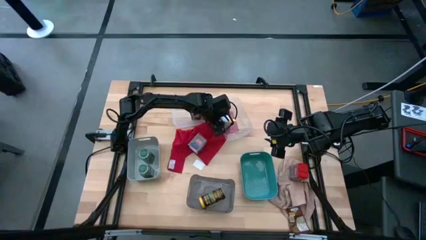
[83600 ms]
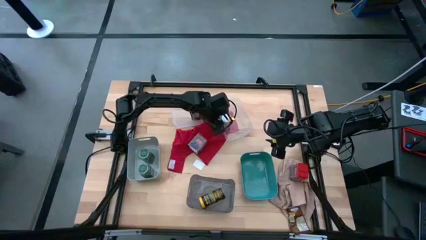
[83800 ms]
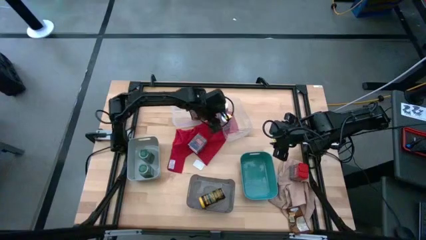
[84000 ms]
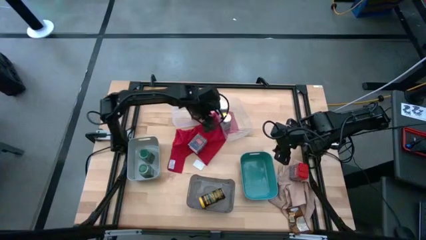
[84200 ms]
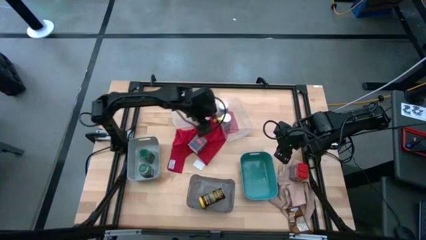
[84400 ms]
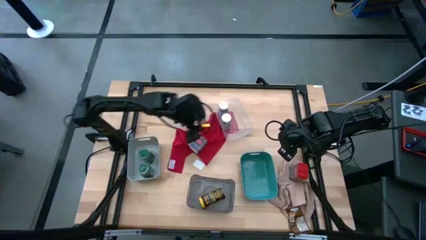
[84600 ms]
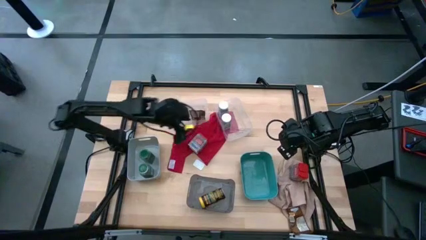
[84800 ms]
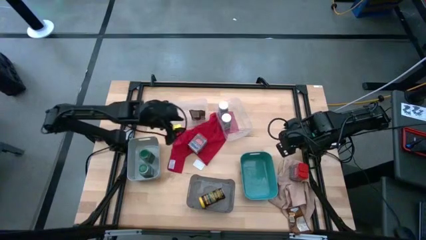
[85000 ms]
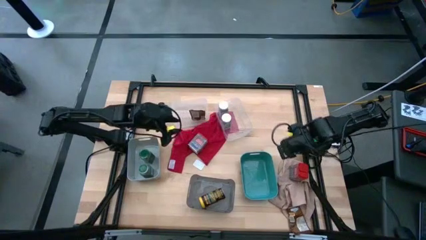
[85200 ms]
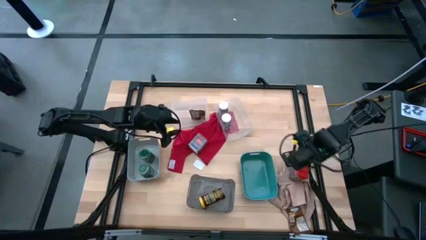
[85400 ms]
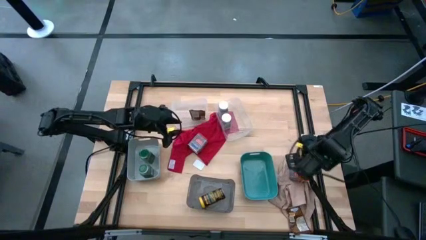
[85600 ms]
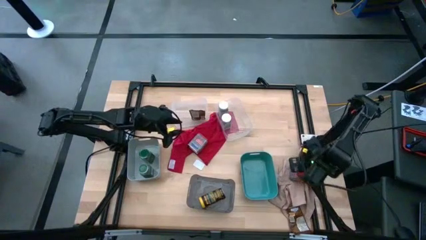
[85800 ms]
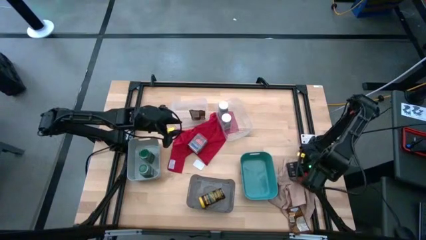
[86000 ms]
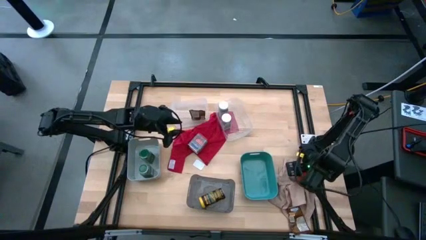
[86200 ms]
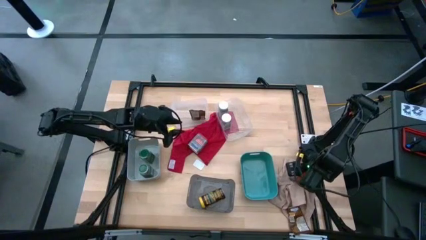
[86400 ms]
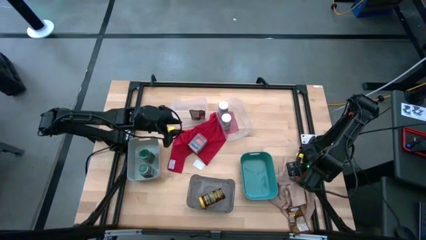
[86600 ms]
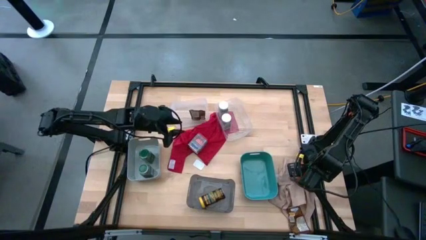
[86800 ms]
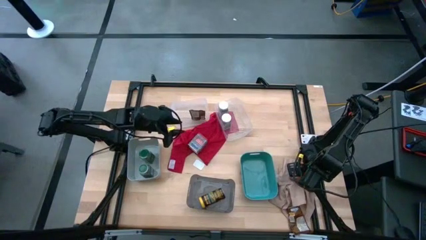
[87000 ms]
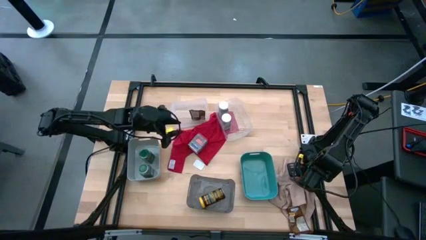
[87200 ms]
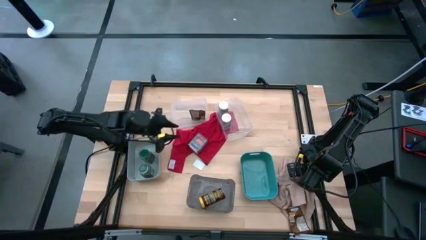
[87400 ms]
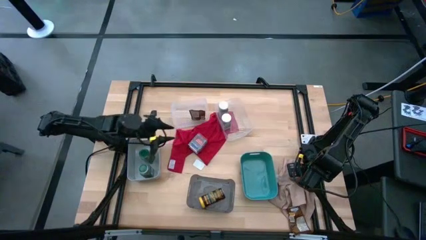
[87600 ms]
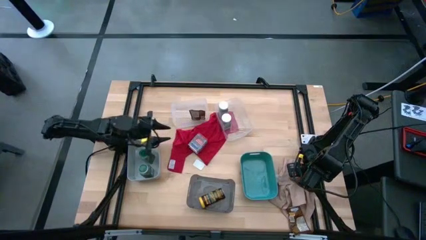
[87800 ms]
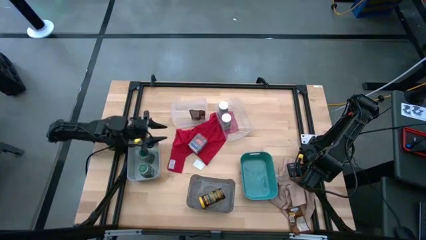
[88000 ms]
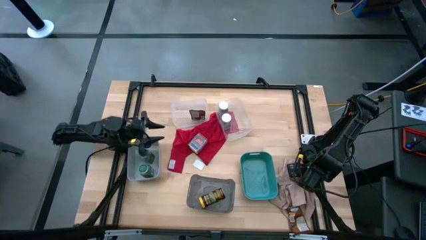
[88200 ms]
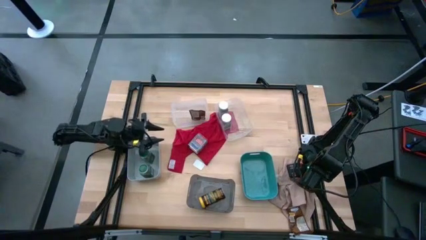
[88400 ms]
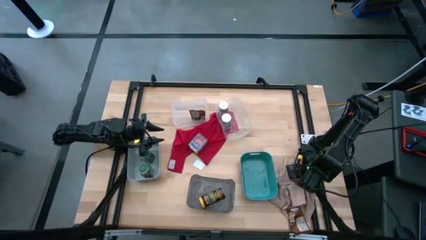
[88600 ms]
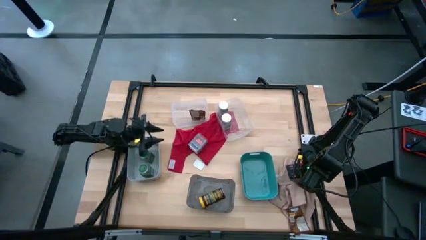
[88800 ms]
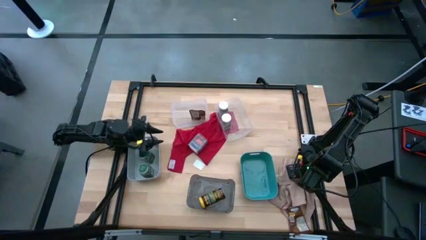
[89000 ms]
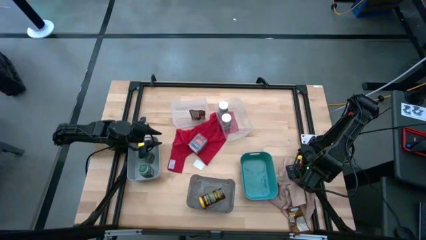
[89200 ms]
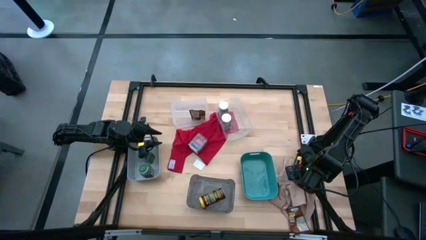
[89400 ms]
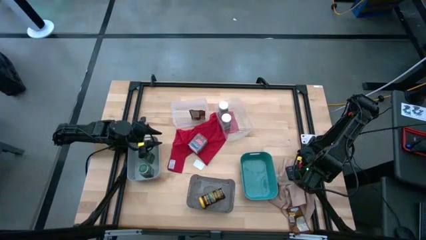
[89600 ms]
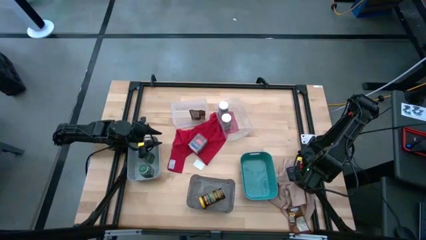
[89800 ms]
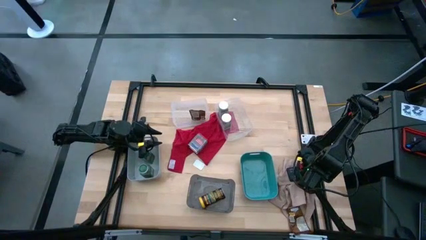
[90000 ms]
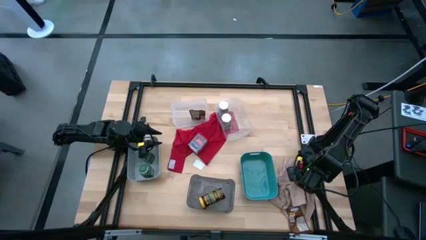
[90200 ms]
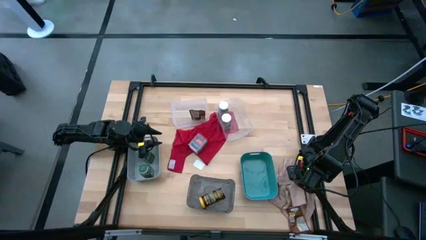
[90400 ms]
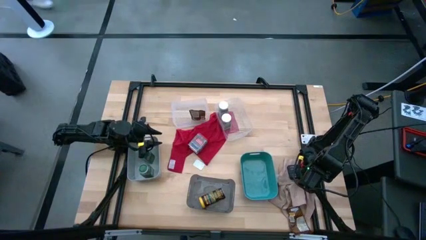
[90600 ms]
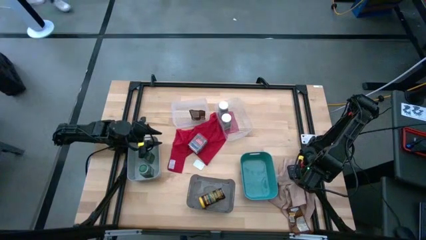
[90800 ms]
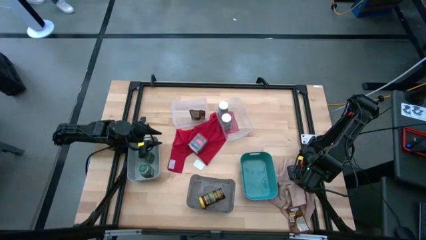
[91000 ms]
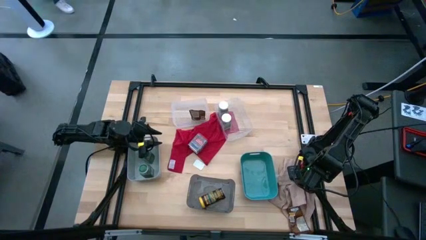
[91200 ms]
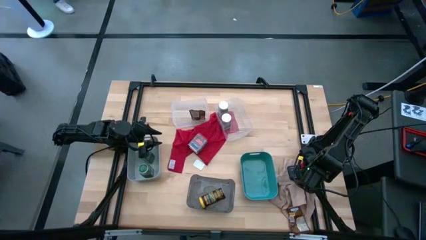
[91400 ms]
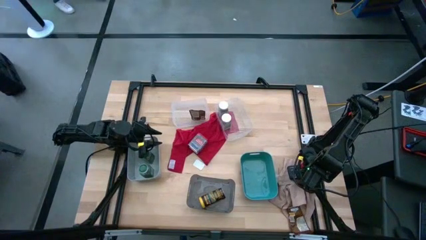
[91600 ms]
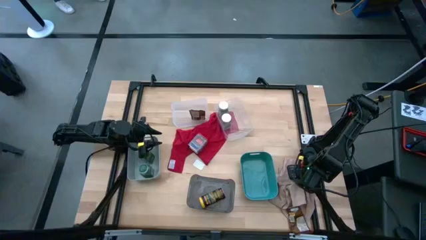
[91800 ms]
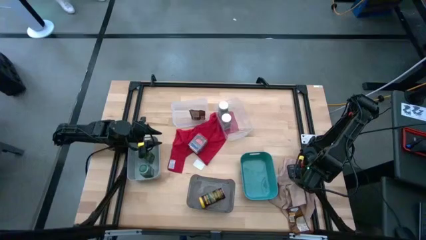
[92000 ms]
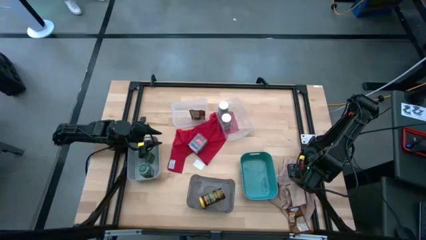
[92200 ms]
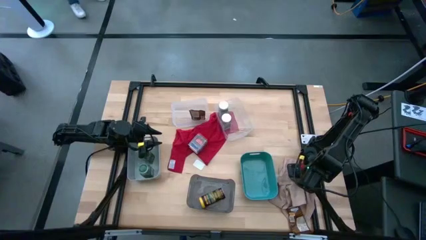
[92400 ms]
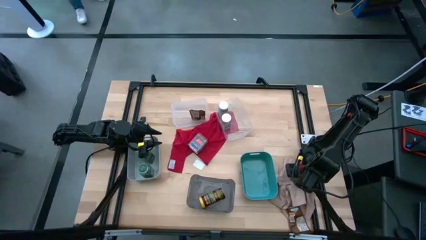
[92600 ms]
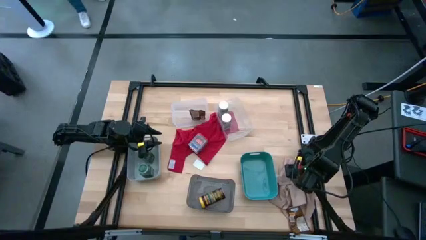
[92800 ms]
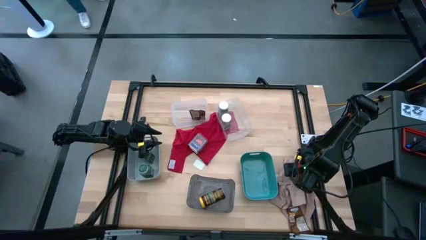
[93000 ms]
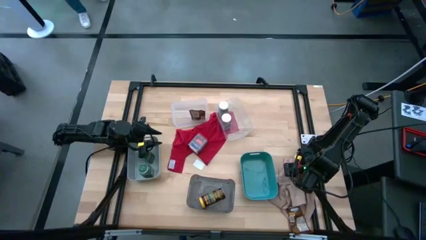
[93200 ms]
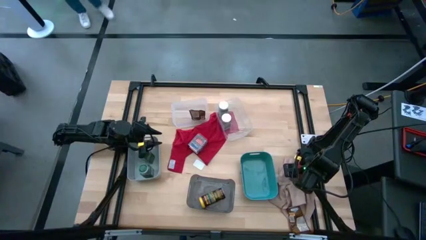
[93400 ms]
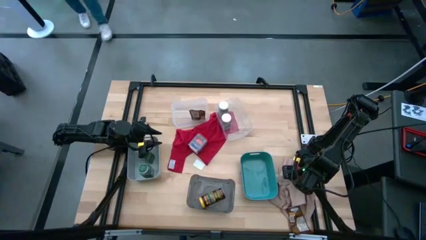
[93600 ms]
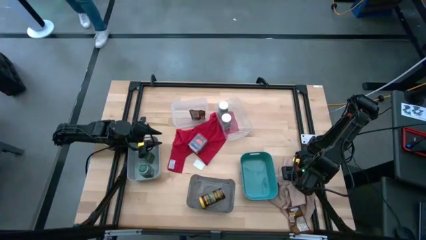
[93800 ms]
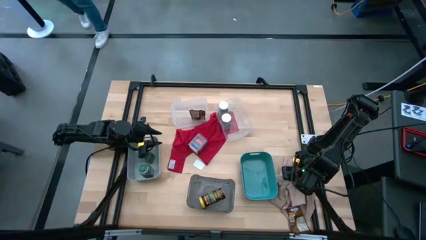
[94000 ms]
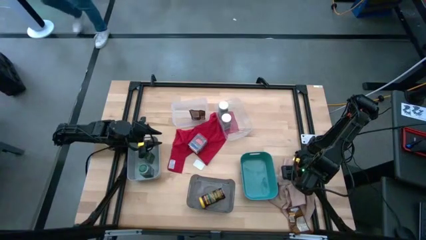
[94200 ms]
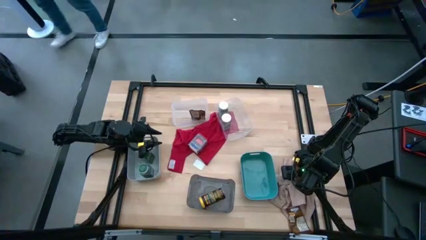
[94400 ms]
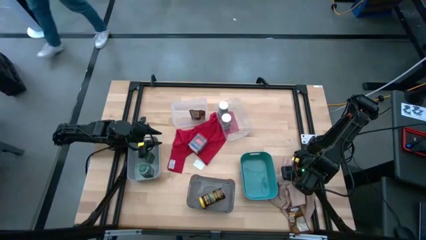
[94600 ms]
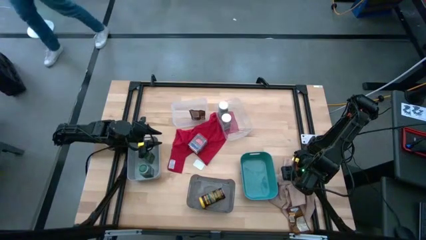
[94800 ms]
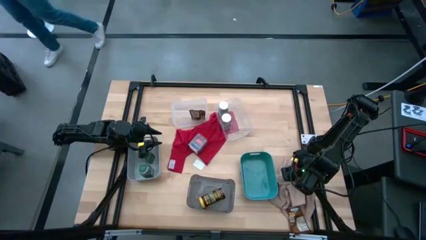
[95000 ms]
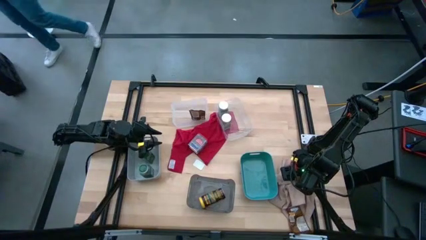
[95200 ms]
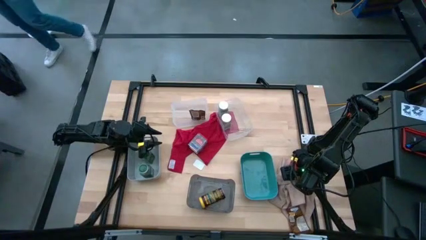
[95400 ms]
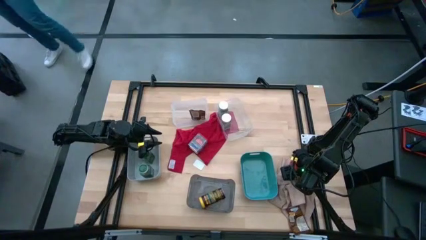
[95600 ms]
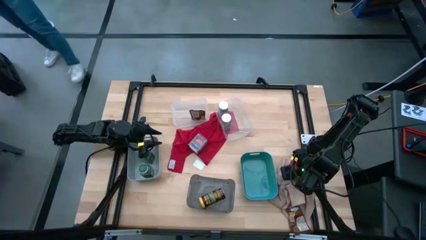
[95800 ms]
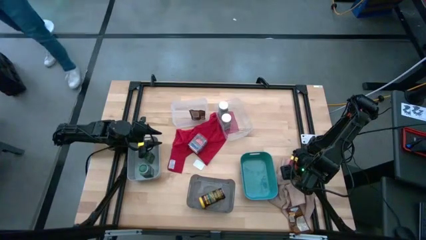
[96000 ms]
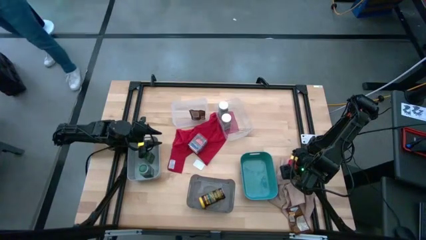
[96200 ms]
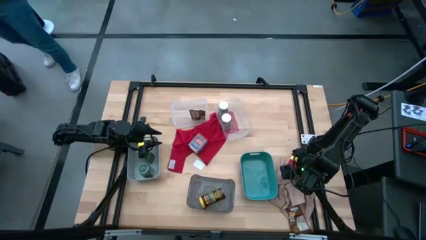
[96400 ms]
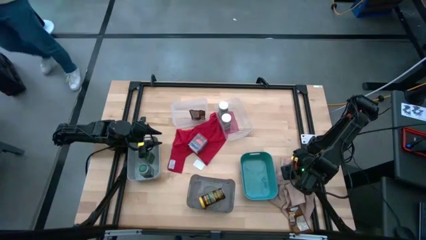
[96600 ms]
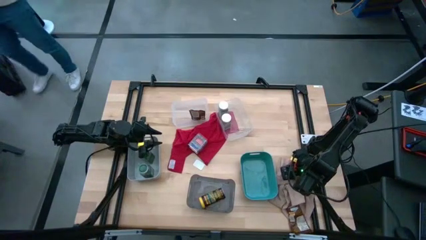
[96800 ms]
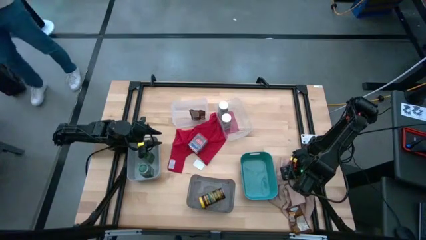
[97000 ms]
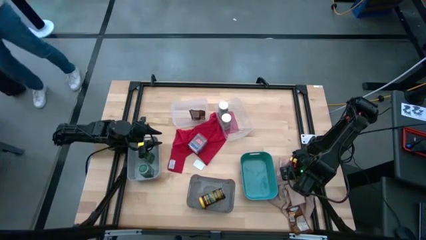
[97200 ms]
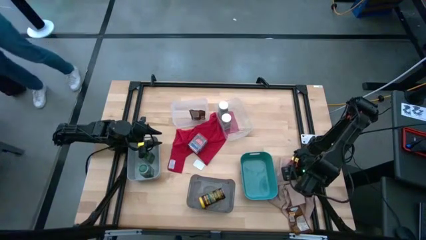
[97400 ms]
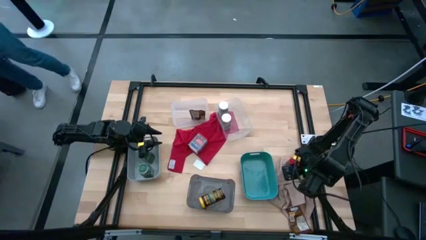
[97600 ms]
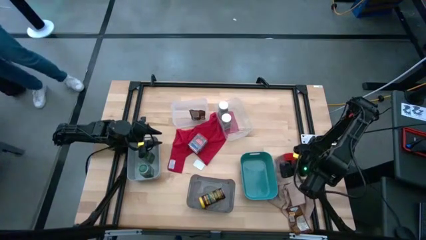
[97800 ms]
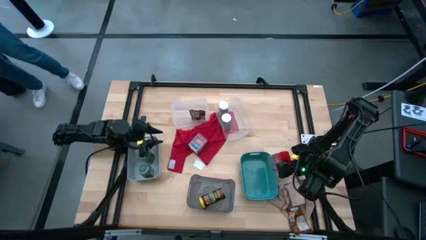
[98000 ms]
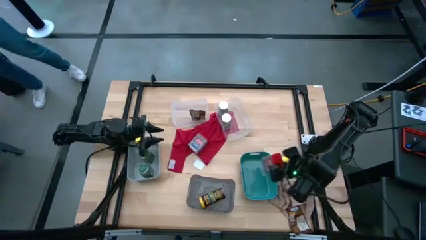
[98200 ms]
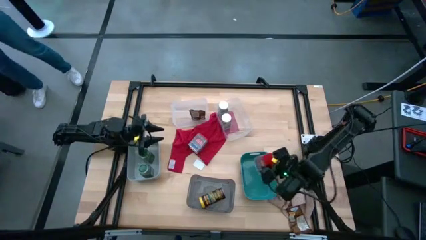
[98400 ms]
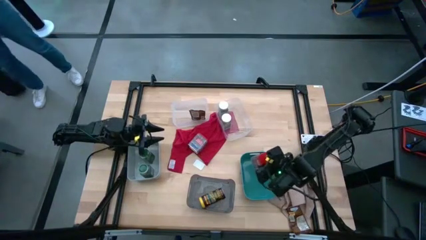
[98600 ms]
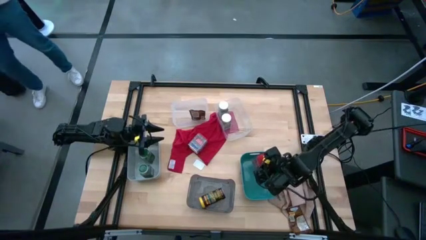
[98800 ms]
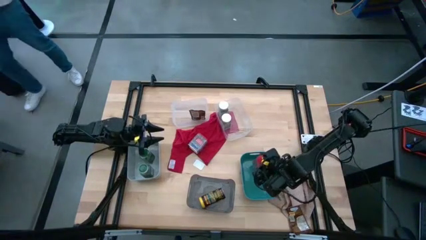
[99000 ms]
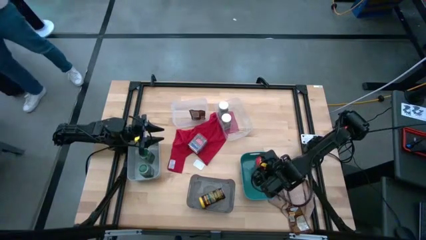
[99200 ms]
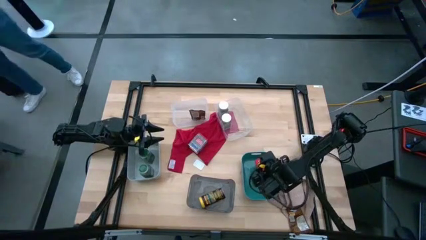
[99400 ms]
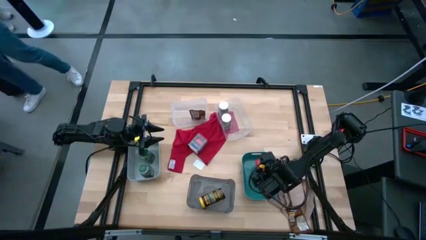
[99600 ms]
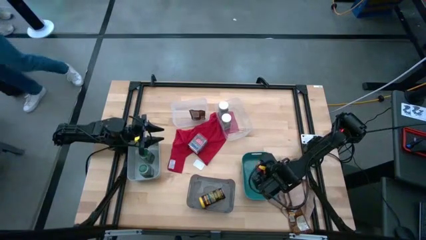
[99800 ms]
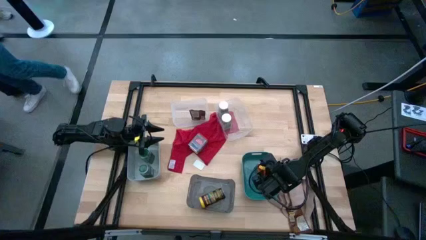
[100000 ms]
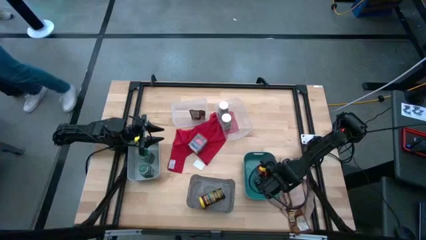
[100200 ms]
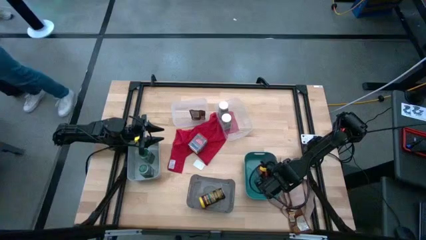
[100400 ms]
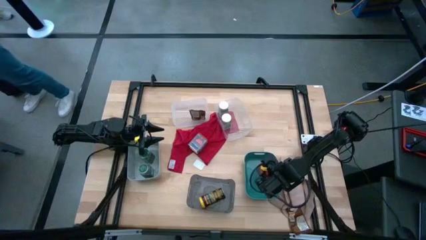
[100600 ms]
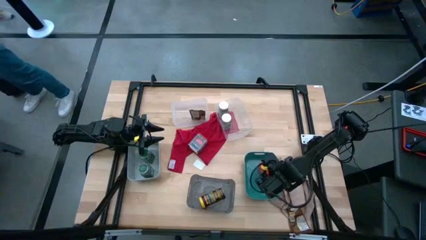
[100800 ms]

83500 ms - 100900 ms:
Task: Sort spices by type
Put the right red seasoning can into the green bin
